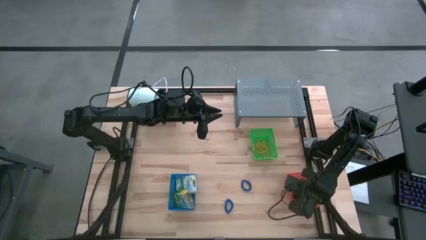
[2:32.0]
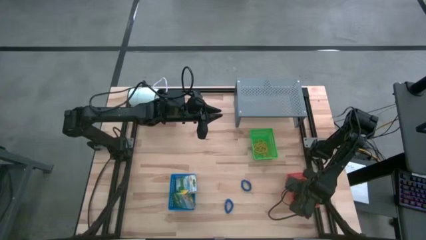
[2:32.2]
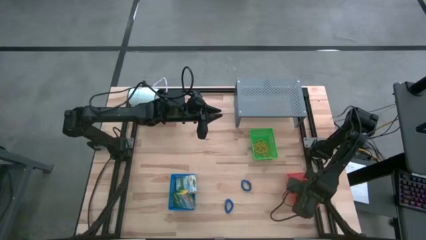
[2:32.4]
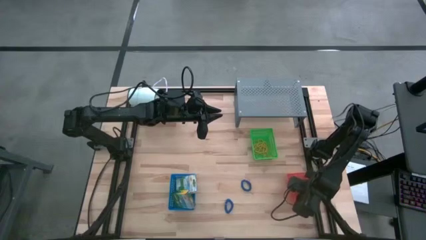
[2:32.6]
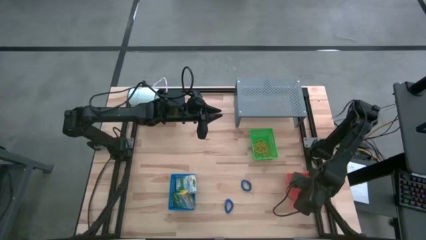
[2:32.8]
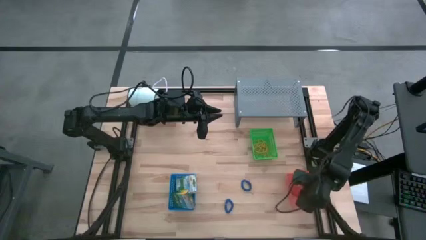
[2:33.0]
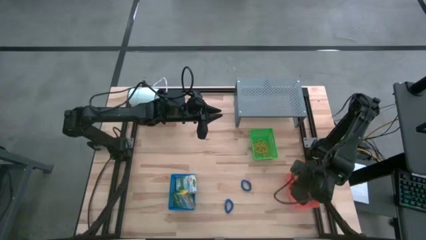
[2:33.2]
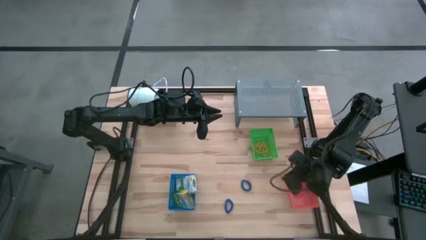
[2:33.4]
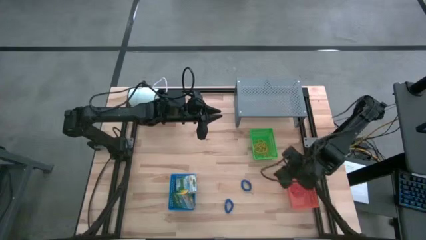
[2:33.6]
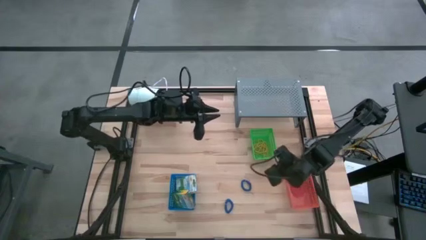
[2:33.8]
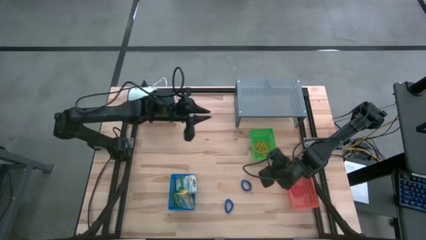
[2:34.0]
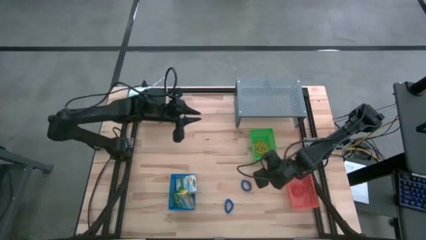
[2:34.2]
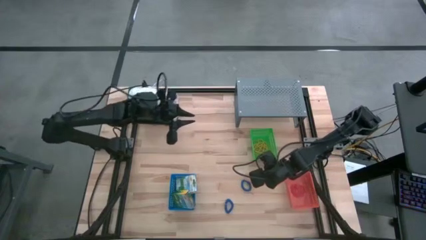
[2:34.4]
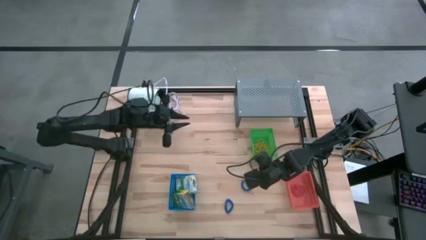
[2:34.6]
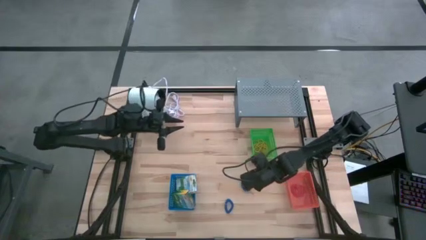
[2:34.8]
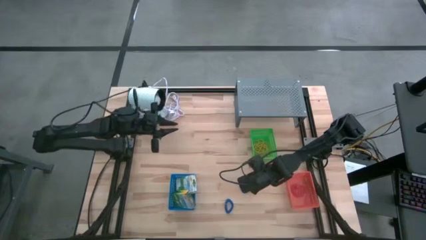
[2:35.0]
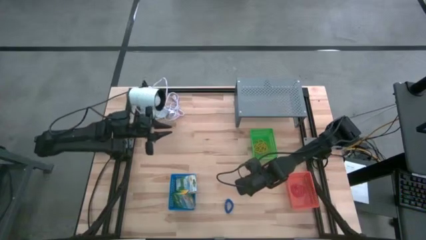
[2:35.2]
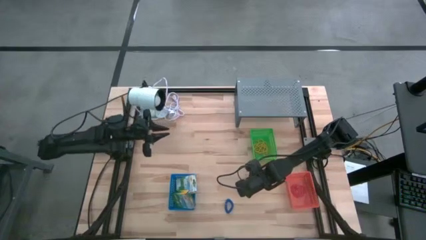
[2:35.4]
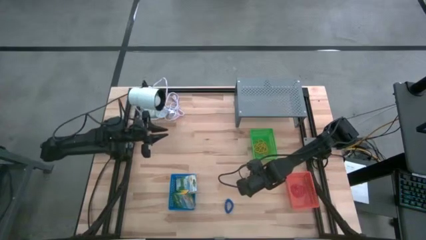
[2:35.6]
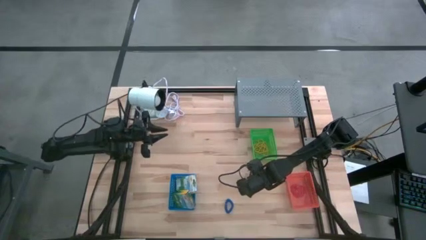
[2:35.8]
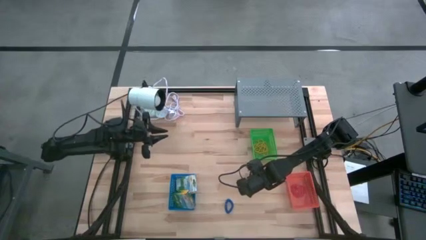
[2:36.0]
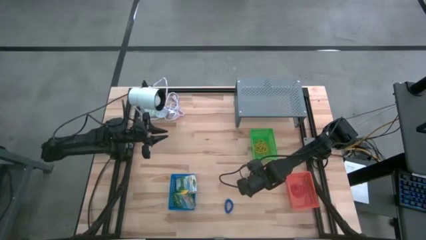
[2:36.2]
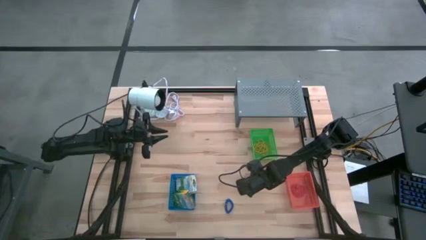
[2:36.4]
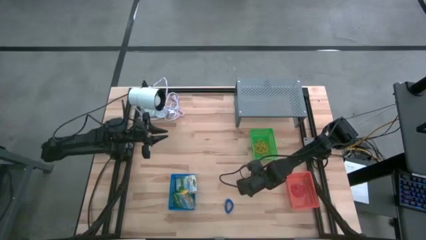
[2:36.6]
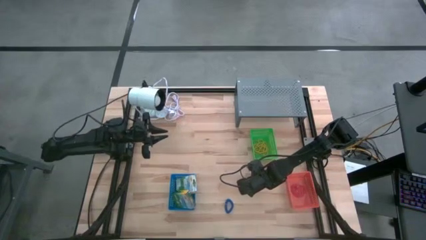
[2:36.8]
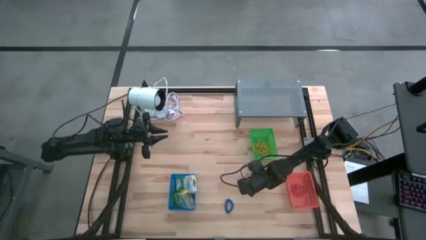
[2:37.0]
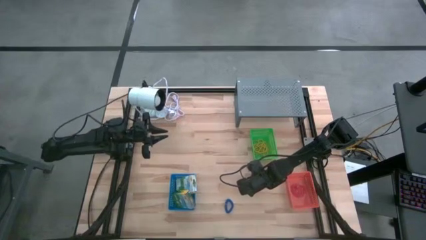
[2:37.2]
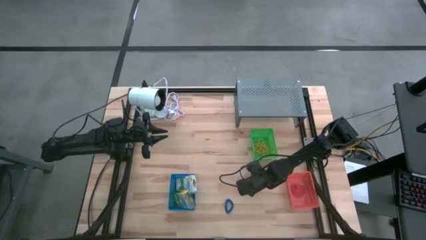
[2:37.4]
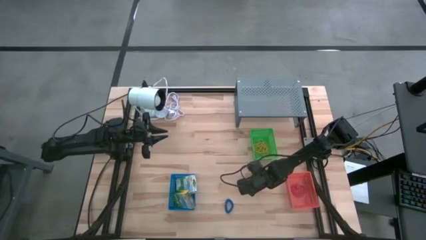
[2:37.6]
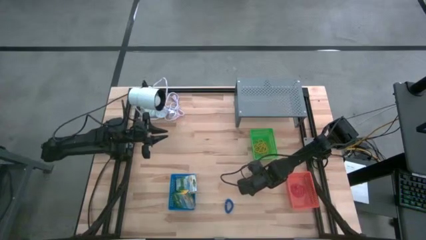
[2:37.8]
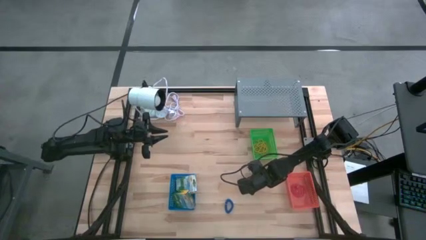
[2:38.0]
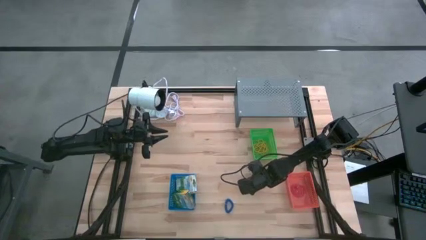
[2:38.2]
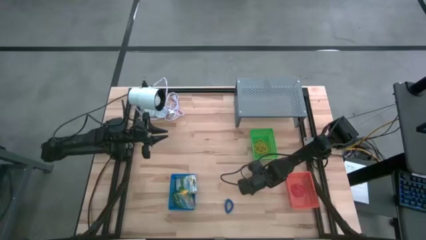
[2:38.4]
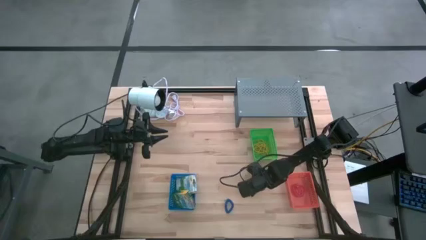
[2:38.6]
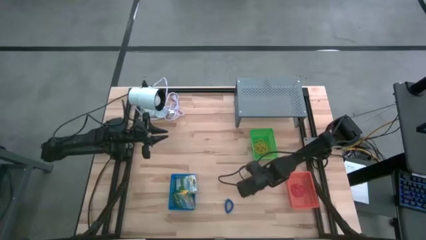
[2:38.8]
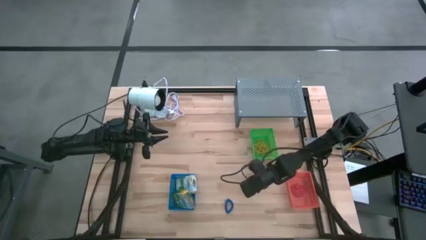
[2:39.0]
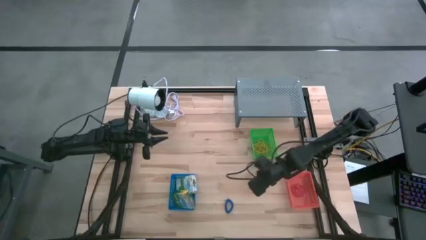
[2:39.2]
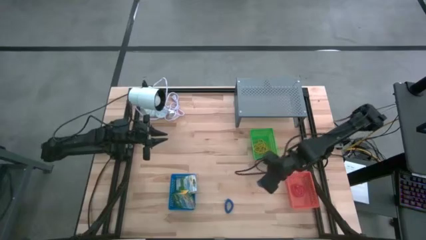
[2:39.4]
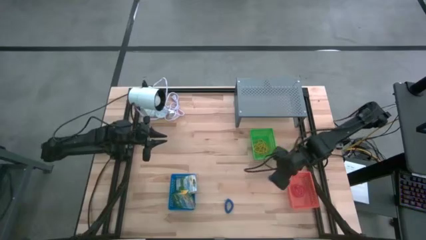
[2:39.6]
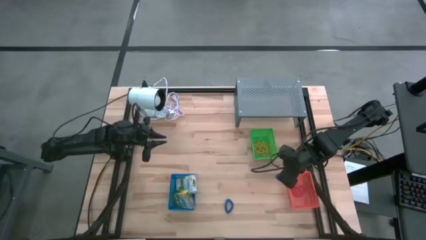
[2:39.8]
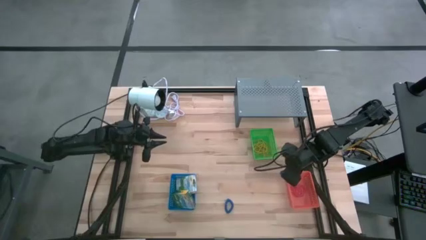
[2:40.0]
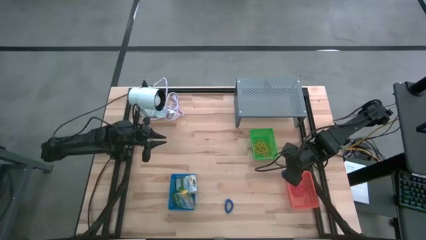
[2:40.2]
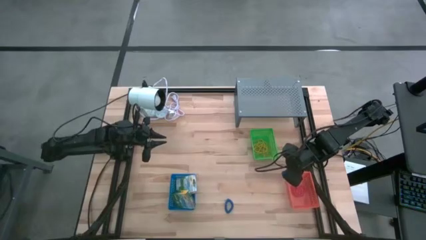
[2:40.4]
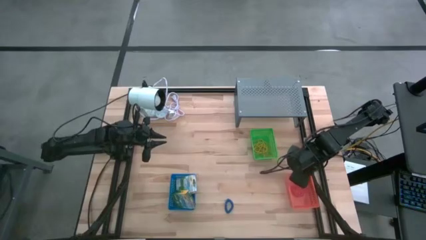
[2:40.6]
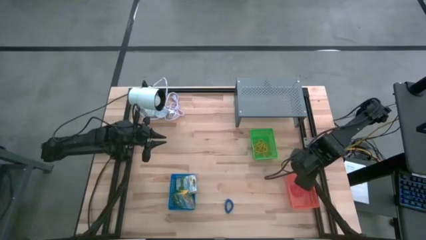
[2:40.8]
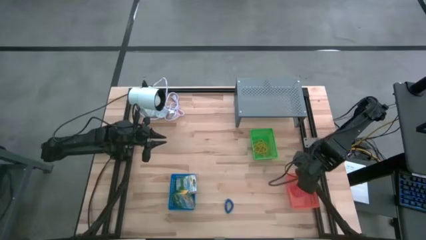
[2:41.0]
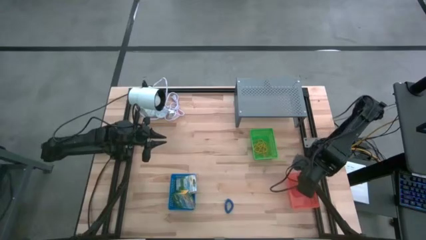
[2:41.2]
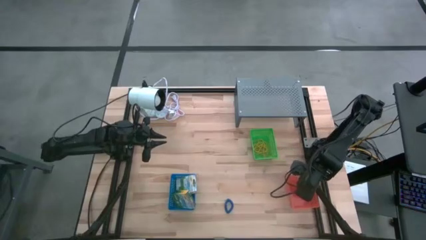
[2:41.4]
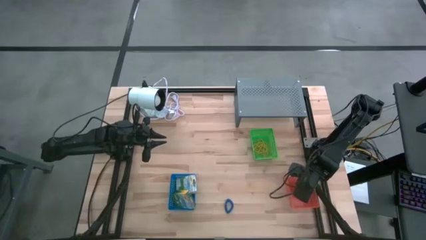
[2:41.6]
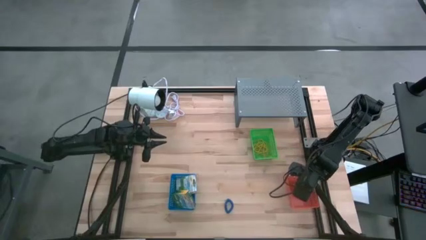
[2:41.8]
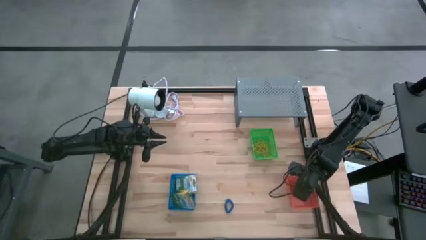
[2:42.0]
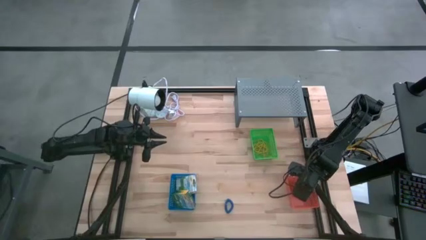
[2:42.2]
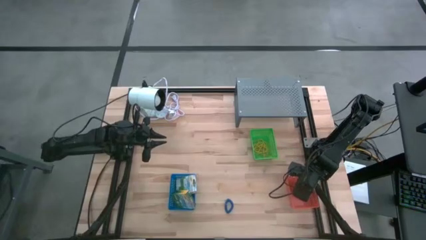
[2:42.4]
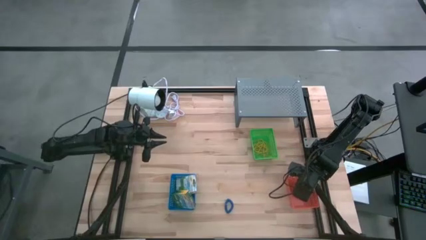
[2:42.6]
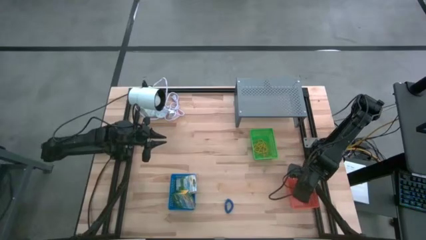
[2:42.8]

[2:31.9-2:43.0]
Task: Pick & Place Office Desk Supplies
Put the blue spring keychain into the orange bin

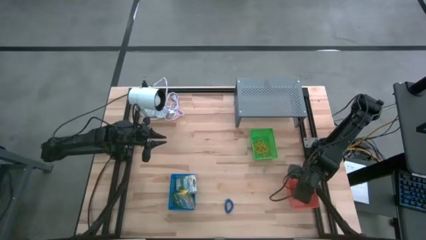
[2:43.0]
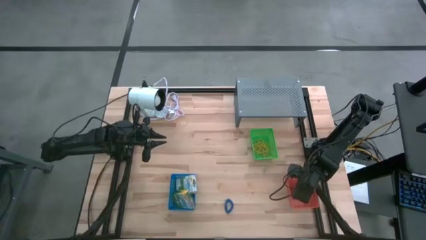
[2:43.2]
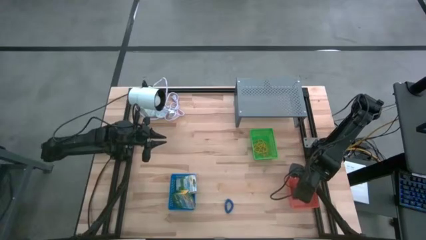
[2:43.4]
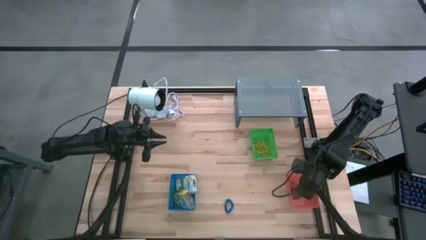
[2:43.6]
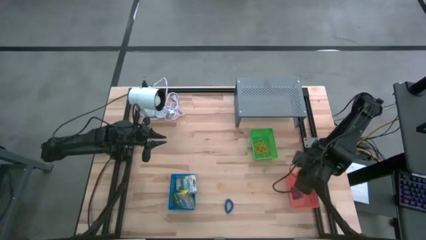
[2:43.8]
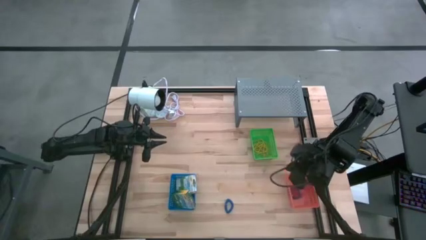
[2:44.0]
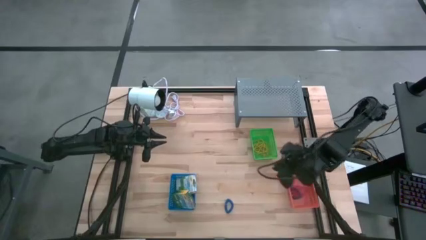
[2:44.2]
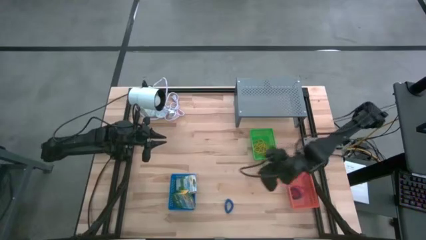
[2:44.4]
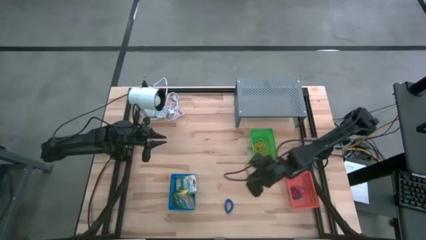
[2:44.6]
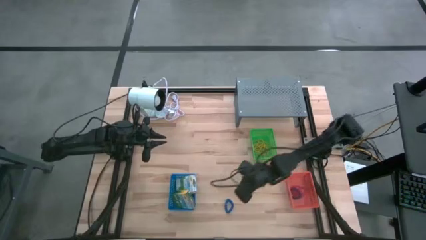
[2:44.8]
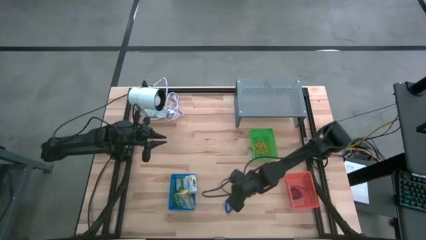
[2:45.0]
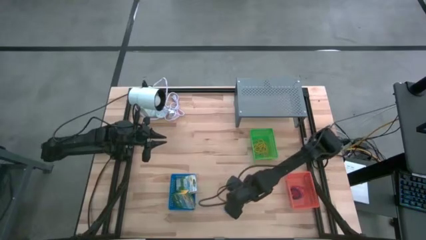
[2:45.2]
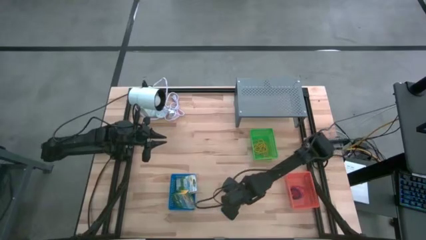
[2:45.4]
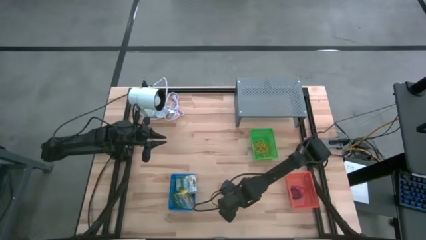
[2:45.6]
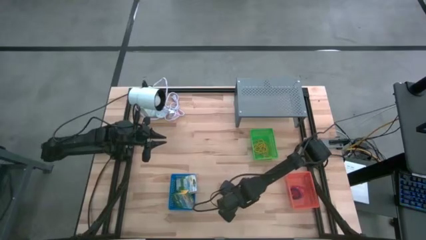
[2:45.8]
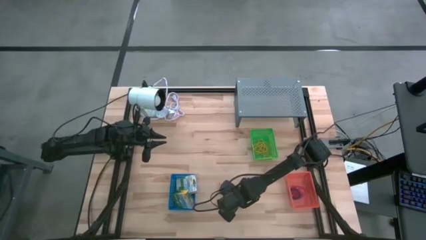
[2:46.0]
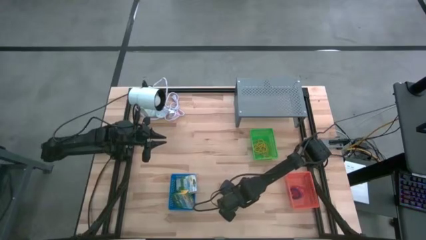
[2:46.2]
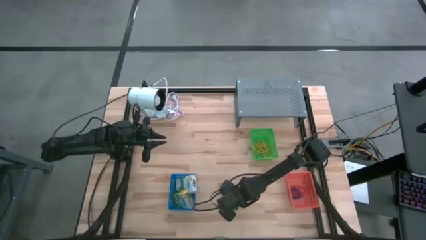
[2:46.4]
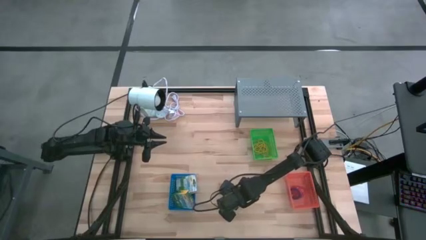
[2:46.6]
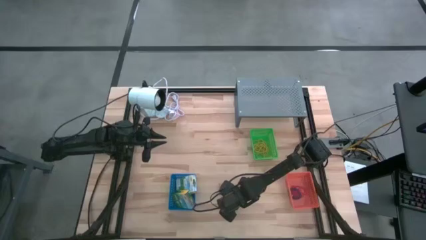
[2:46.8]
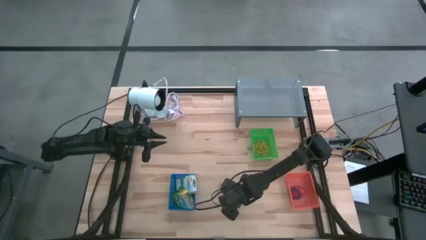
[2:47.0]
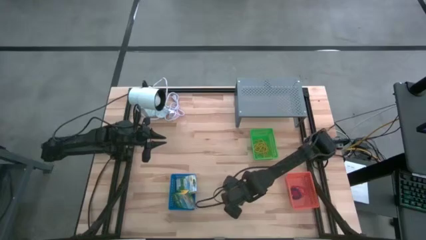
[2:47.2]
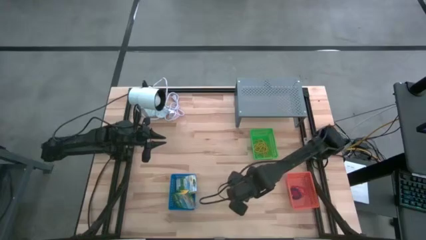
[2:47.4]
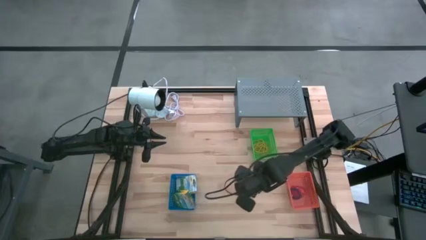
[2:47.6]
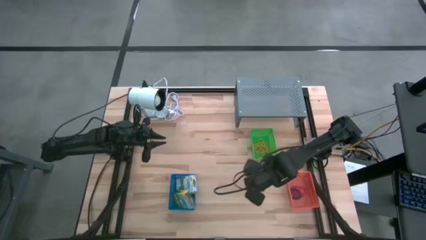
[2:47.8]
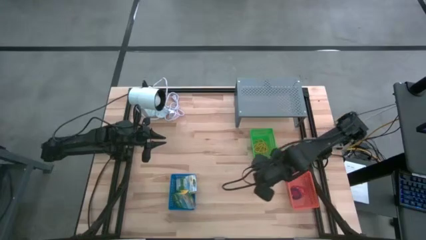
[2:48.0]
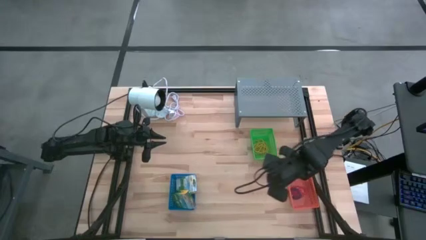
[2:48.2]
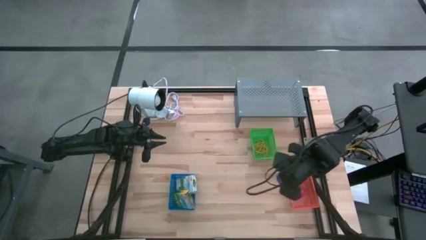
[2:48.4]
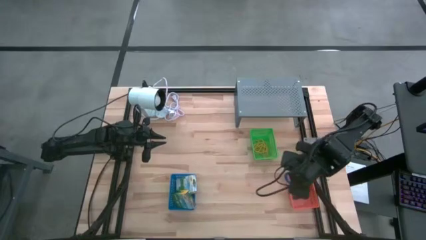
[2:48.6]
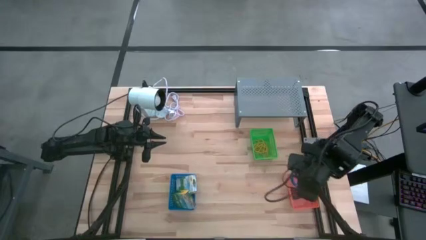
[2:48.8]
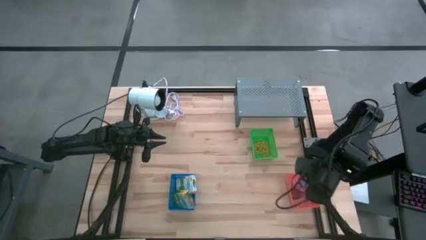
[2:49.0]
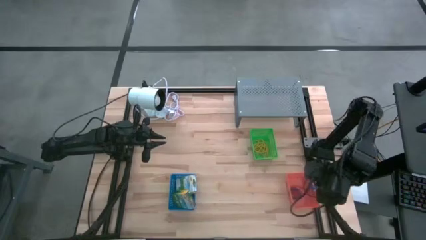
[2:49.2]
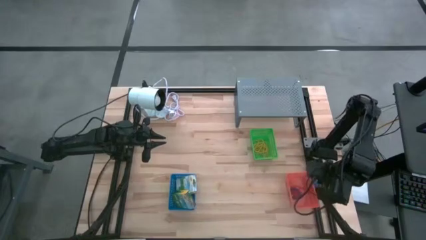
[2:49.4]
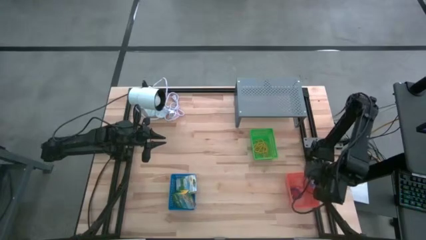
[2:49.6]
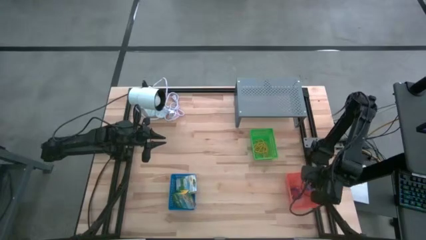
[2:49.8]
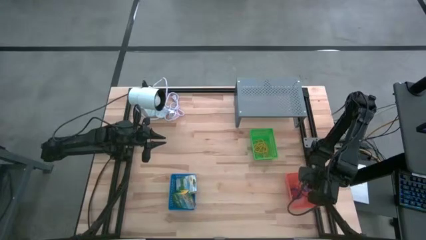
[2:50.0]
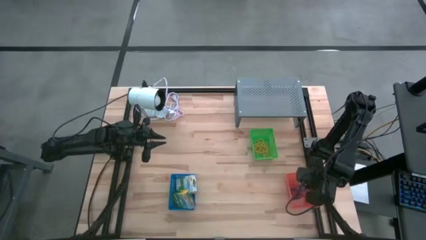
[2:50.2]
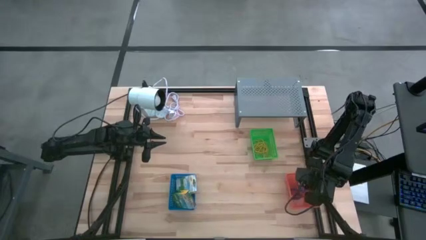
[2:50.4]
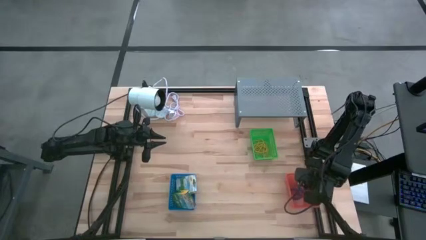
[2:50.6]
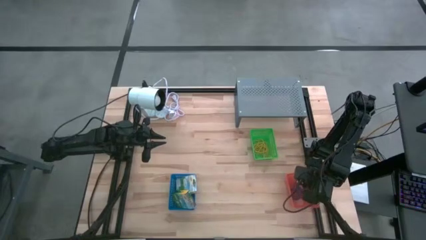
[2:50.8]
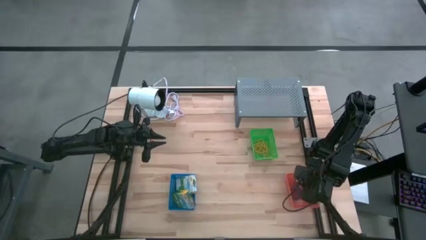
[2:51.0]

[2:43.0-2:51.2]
Put the blue spring keychain into the orange bin
